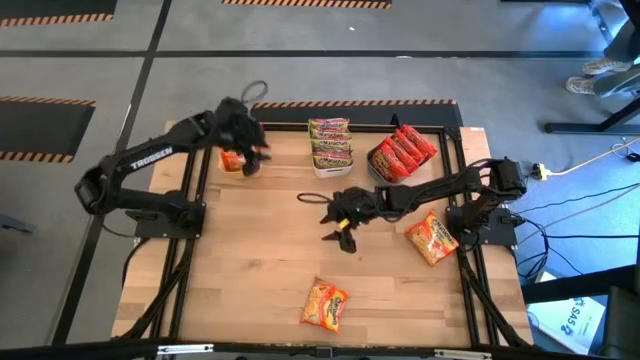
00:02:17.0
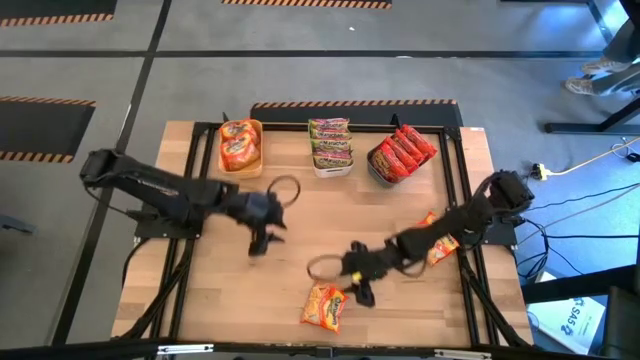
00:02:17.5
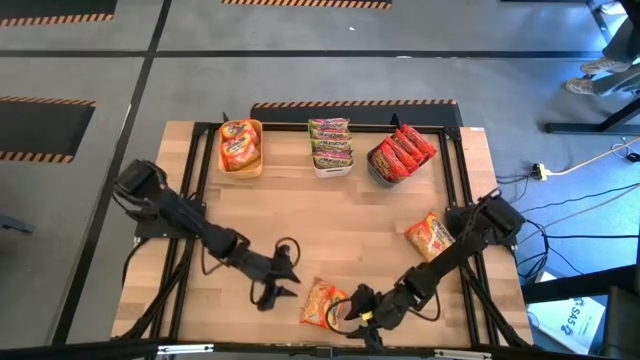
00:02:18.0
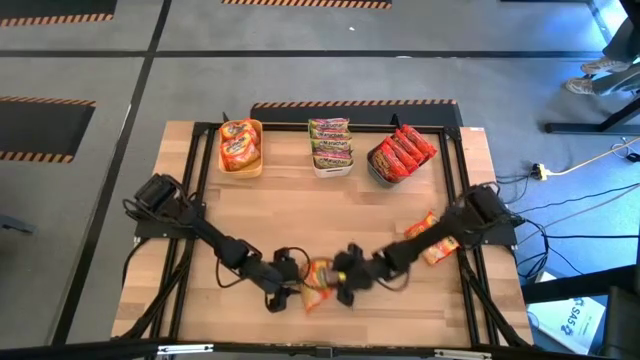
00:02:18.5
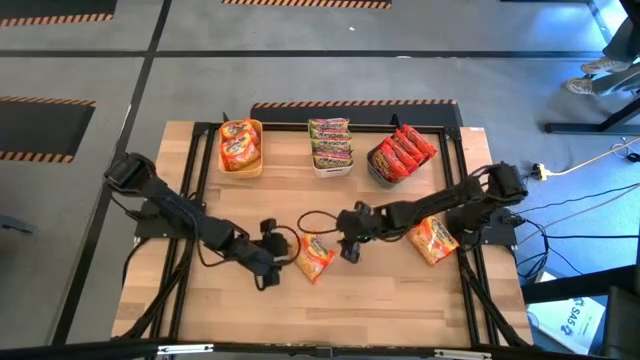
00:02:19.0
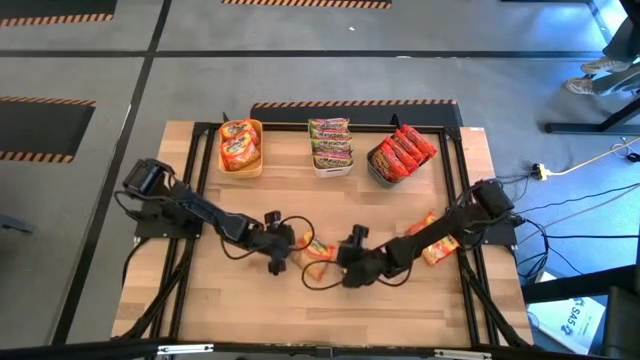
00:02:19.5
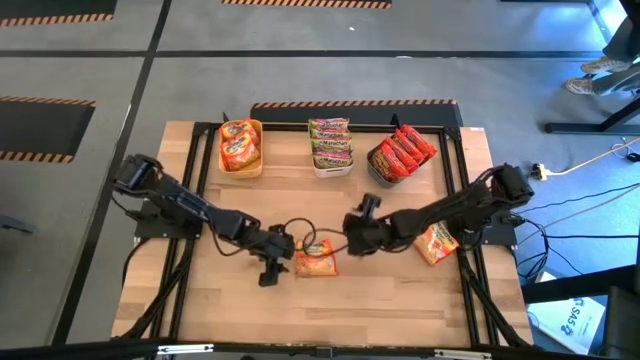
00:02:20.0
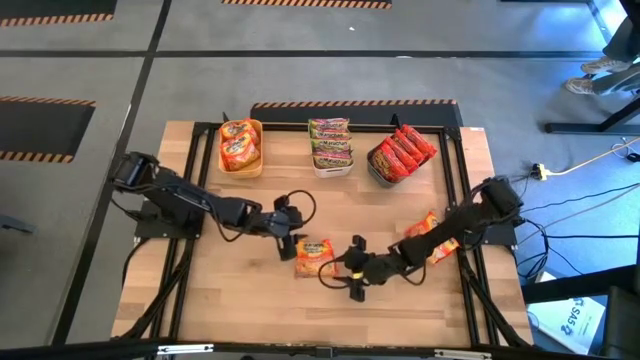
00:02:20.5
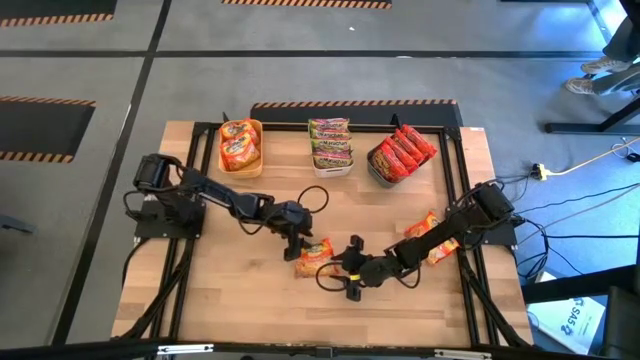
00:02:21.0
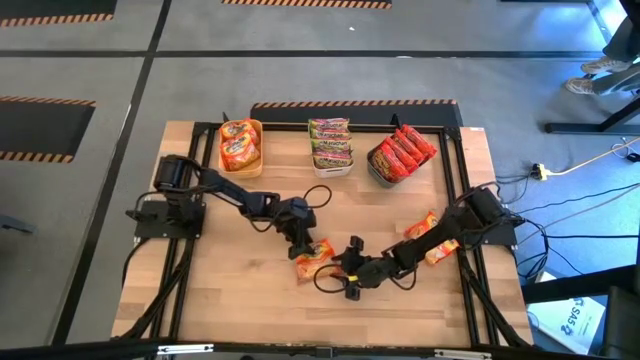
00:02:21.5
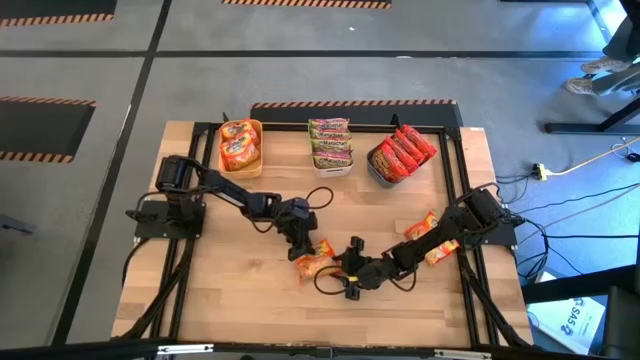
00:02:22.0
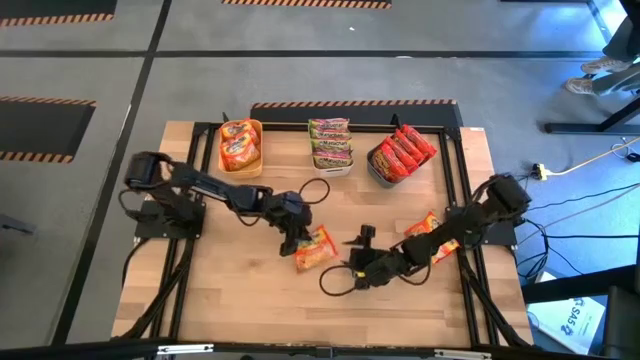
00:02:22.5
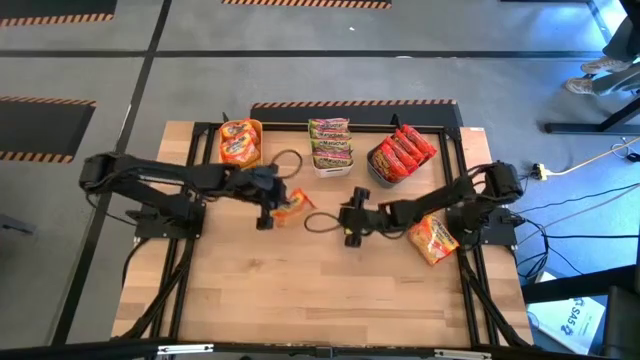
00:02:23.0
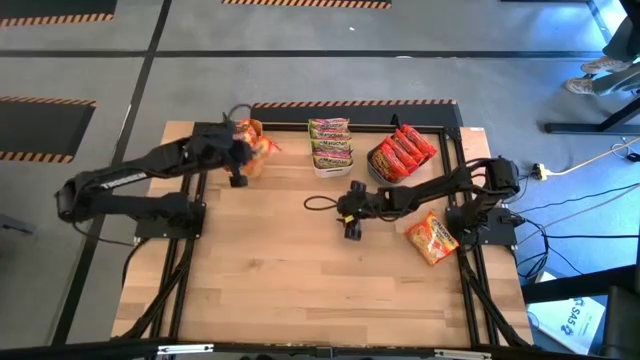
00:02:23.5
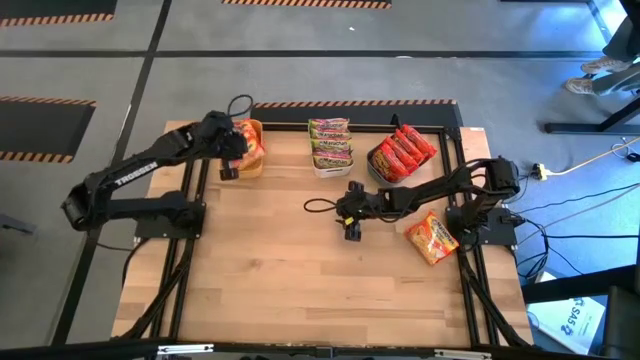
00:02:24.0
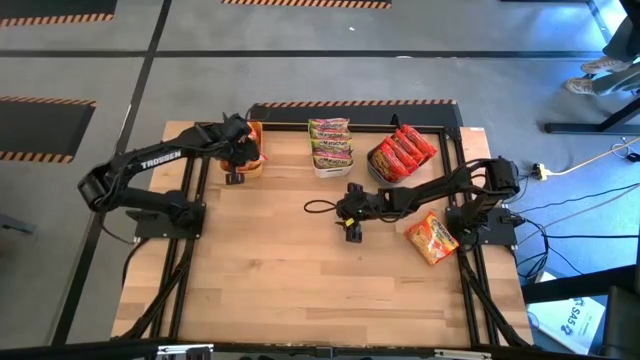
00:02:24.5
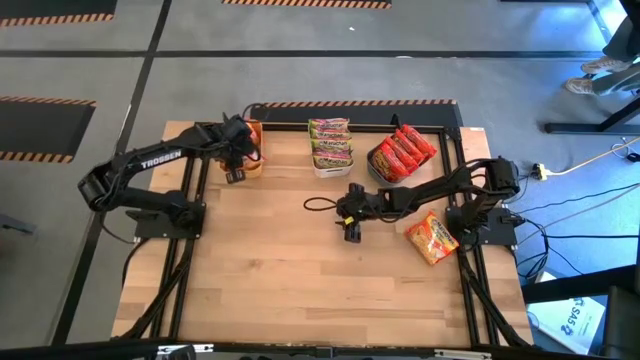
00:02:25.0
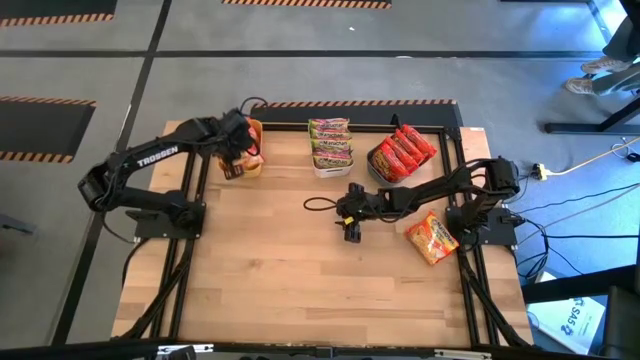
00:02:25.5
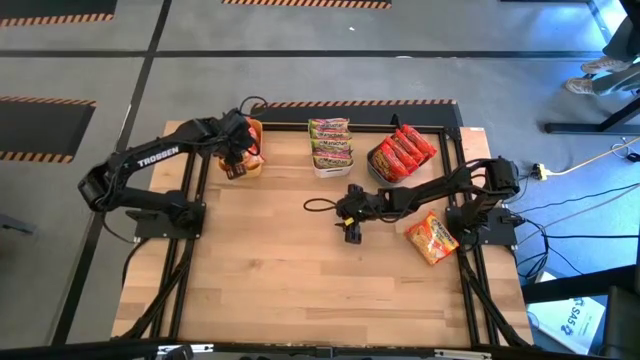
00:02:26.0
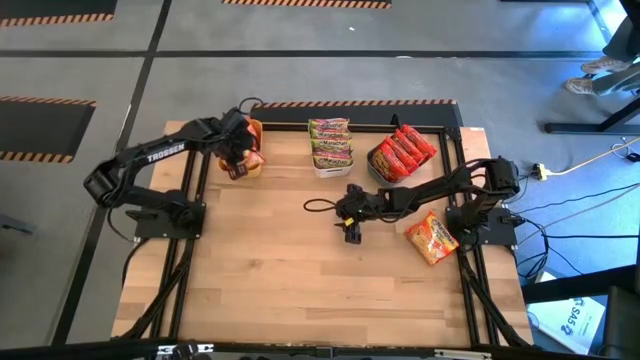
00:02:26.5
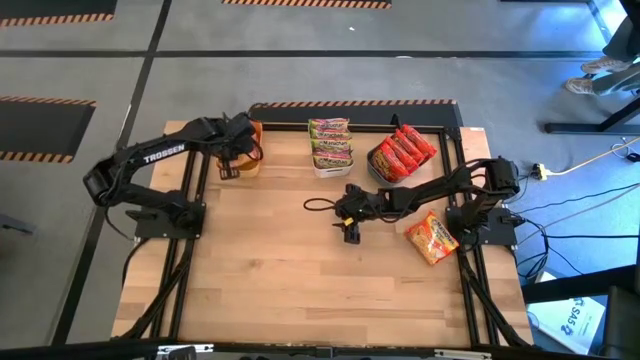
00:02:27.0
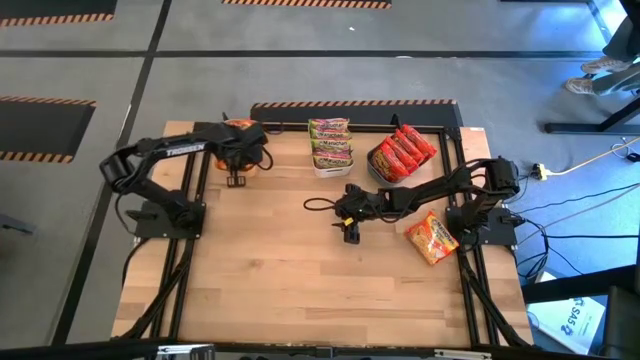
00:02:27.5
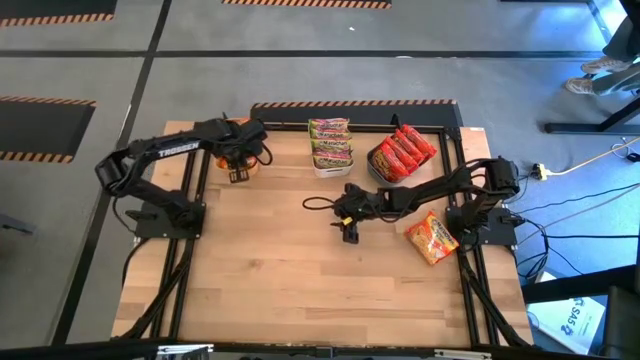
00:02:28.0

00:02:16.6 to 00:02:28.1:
Task: Sort Maruchan noodles
Put the orange noodle pack into the yellow bin

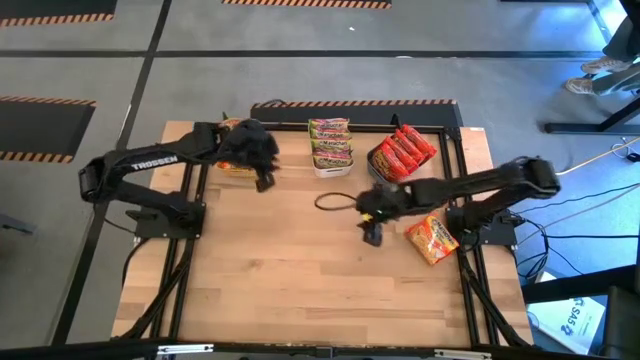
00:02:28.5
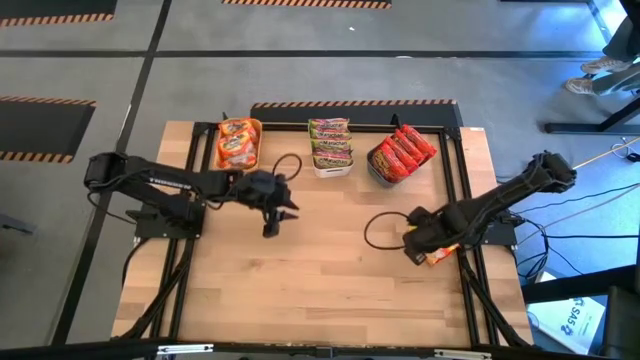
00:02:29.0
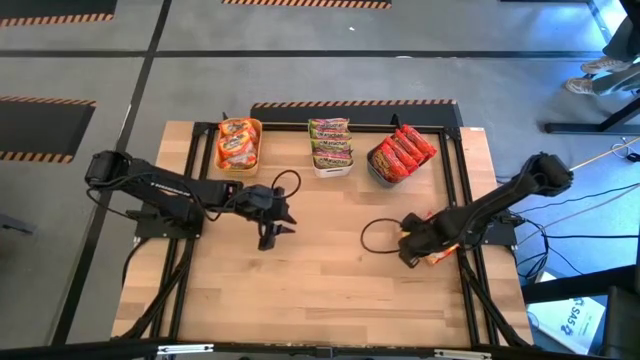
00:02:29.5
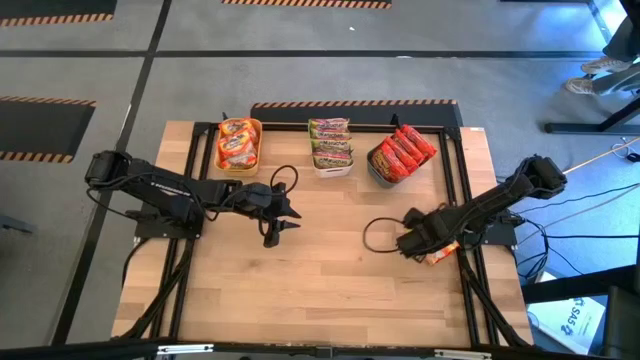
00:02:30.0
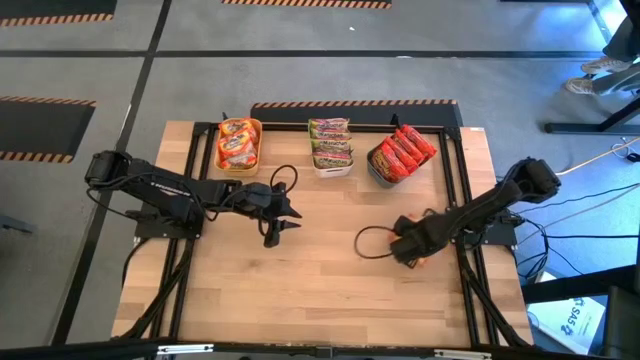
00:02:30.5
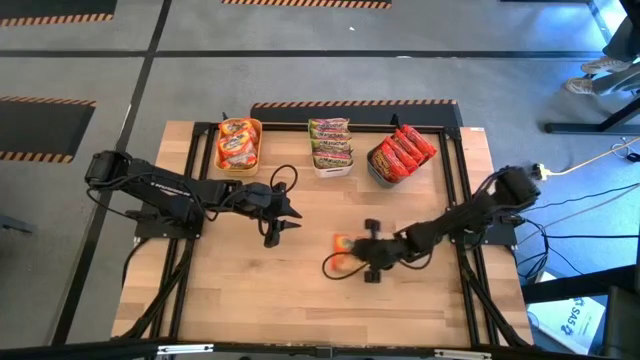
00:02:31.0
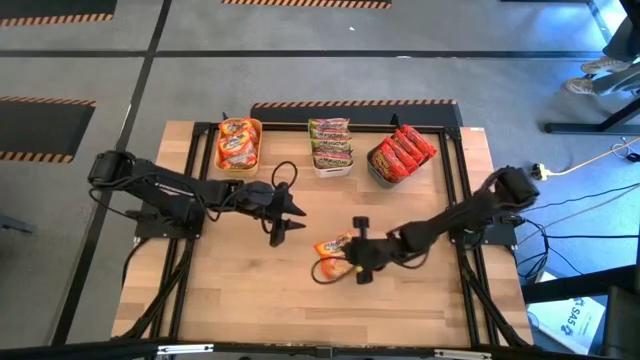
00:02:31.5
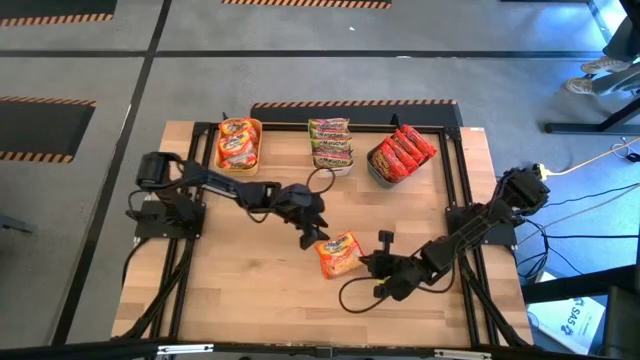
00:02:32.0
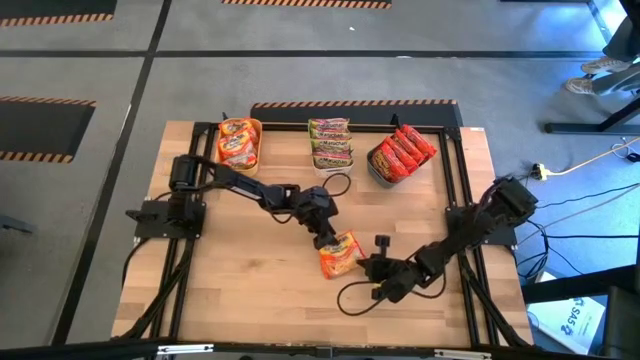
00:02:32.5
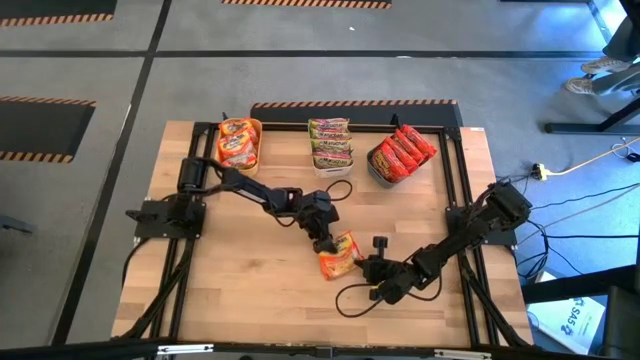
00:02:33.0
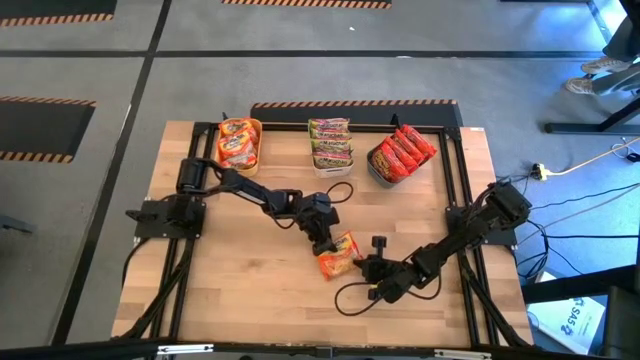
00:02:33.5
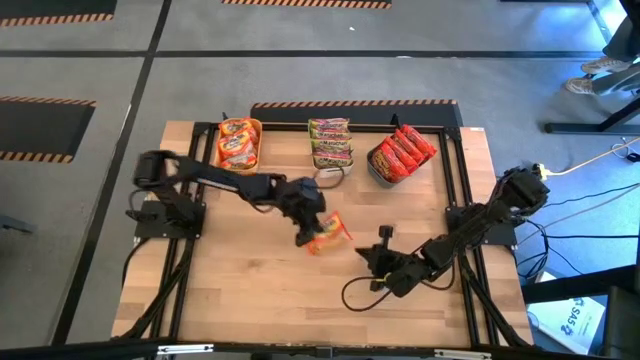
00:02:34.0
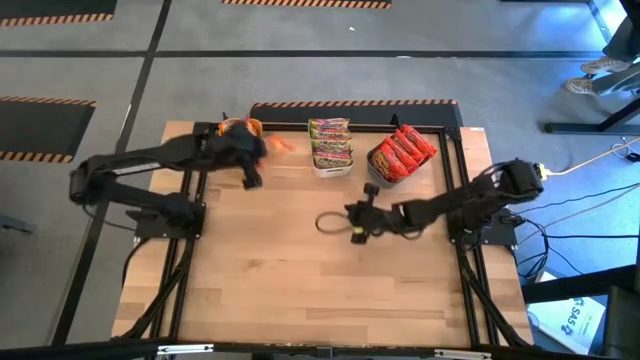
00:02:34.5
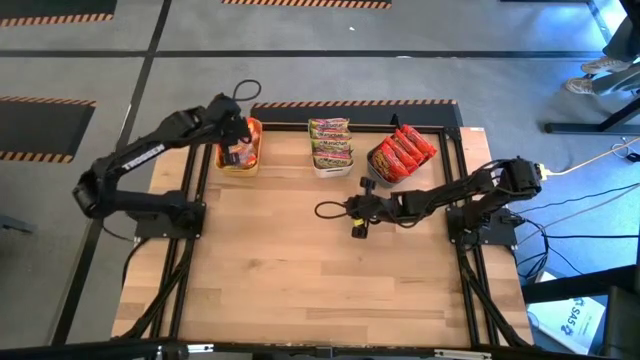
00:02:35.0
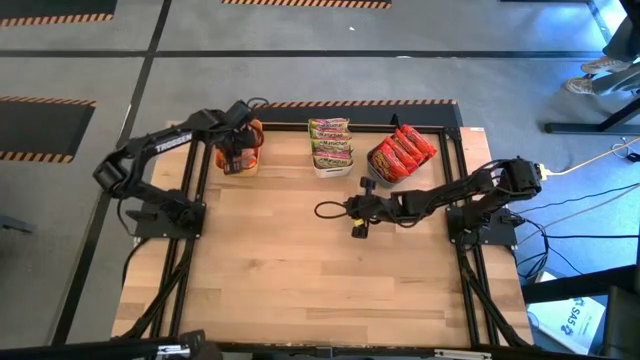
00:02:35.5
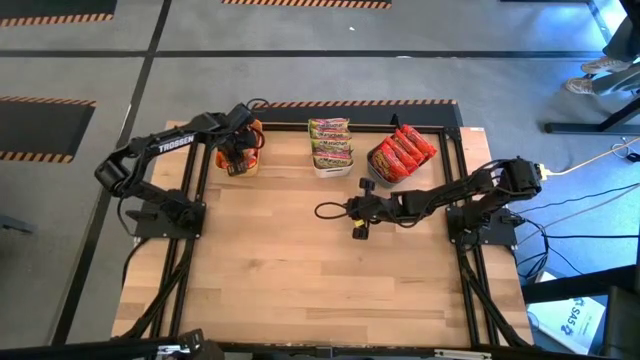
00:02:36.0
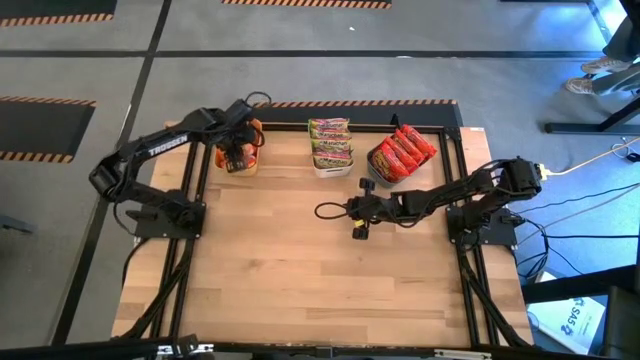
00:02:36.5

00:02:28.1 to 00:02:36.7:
Put the orange noodle pack into the yellow bin

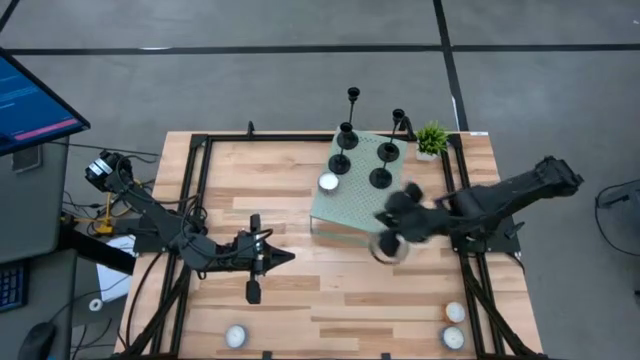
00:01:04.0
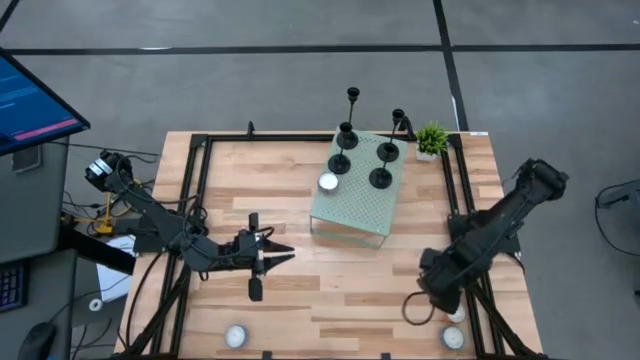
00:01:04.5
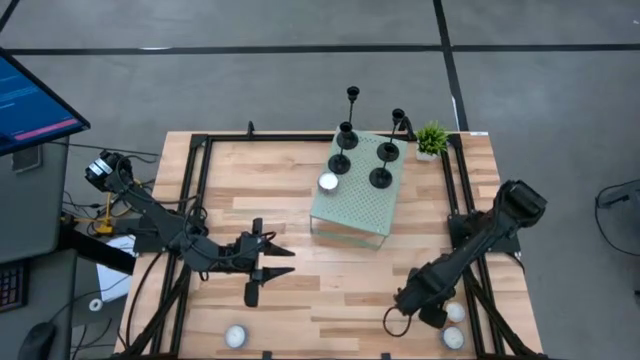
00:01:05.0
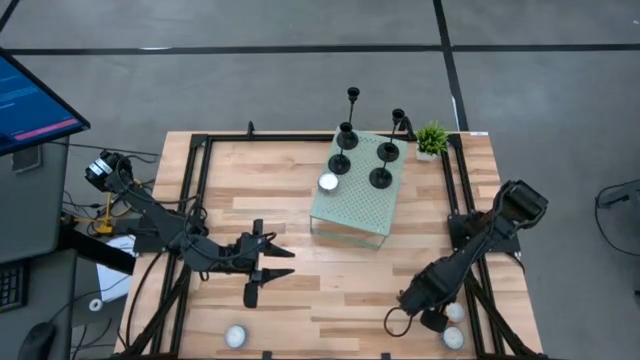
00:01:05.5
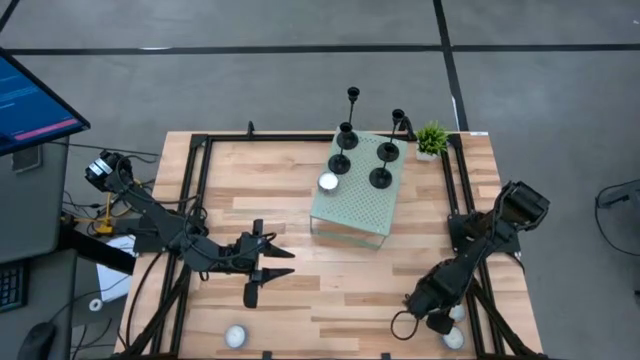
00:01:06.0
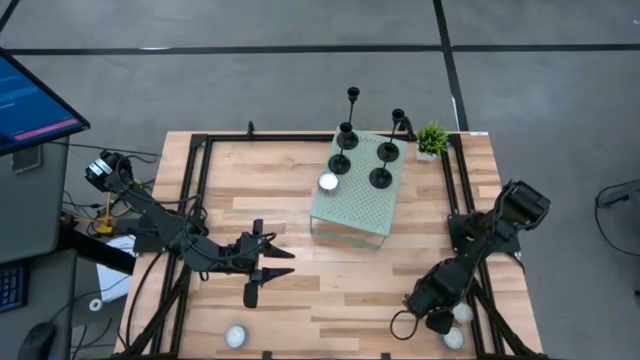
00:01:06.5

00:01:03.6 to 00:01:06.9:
Task: Pick & Place candle stick holders
Put the orange patterned scented candle on the shelf
